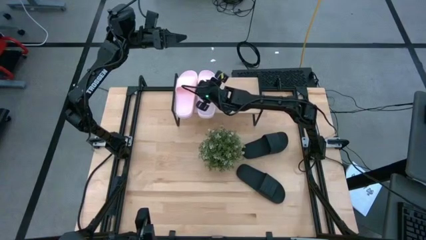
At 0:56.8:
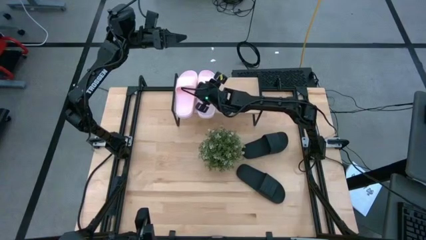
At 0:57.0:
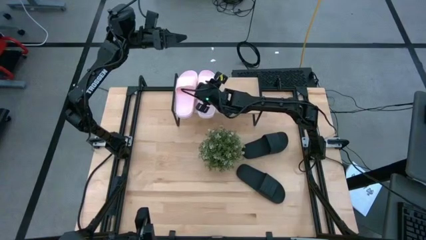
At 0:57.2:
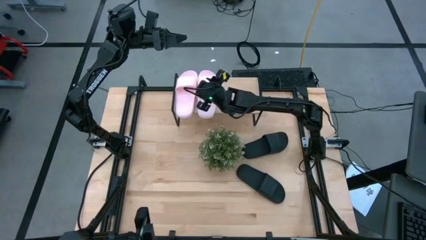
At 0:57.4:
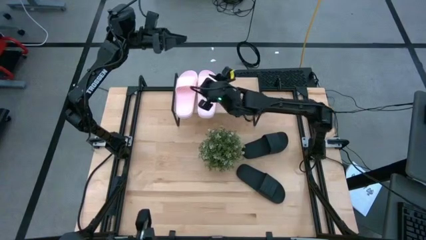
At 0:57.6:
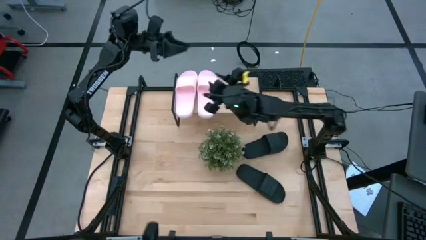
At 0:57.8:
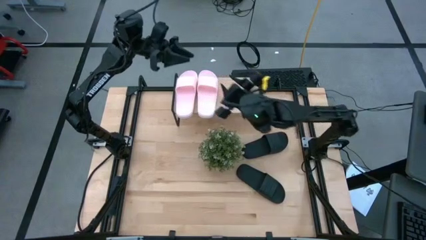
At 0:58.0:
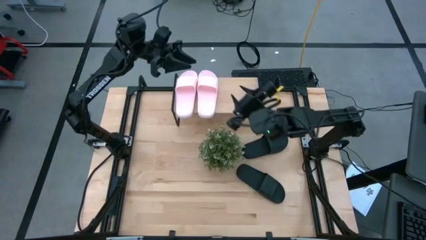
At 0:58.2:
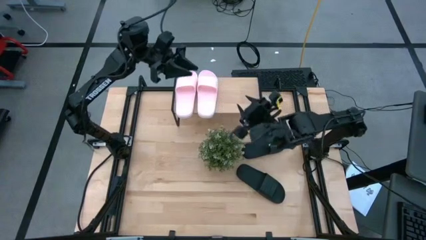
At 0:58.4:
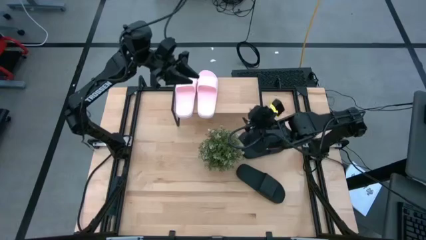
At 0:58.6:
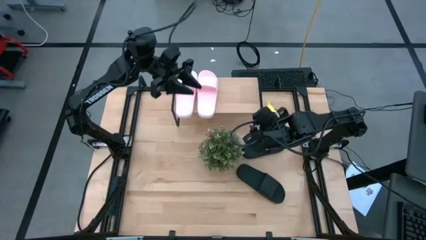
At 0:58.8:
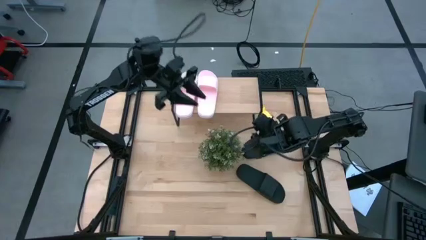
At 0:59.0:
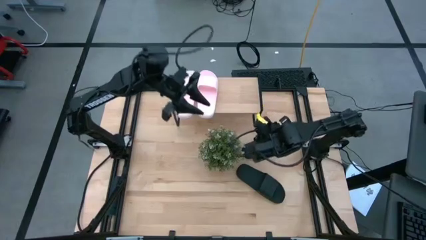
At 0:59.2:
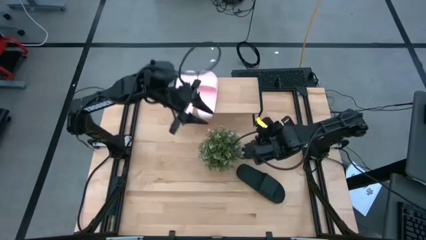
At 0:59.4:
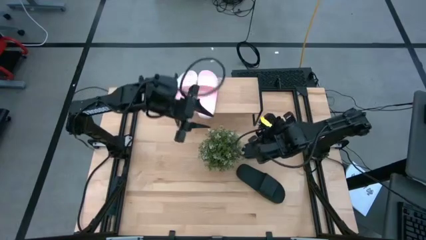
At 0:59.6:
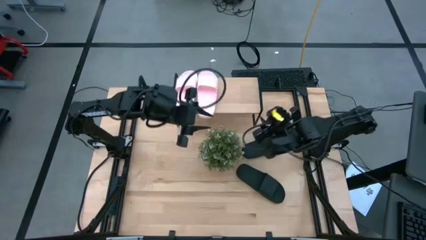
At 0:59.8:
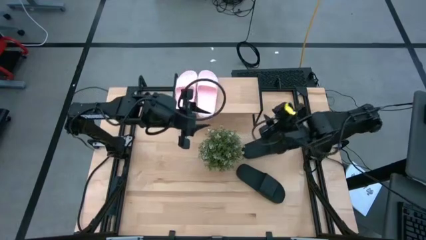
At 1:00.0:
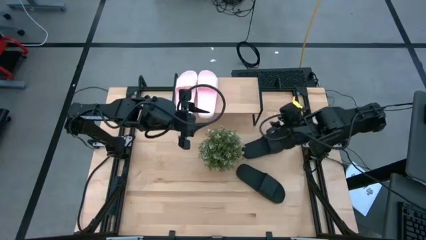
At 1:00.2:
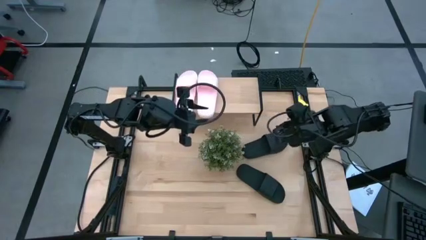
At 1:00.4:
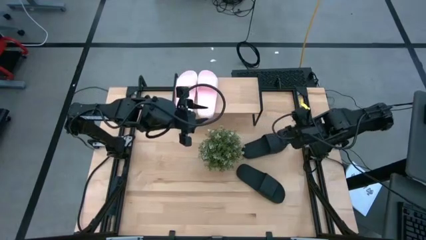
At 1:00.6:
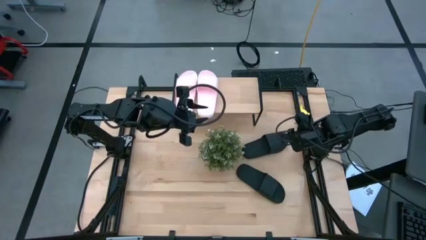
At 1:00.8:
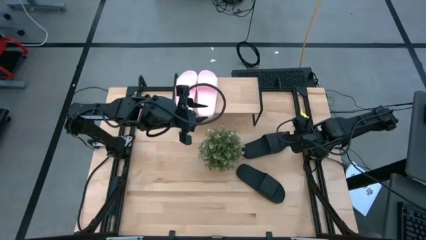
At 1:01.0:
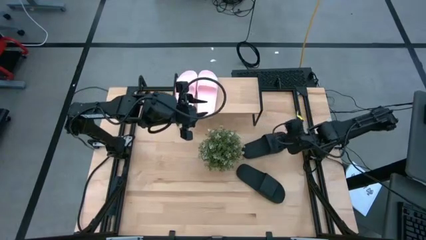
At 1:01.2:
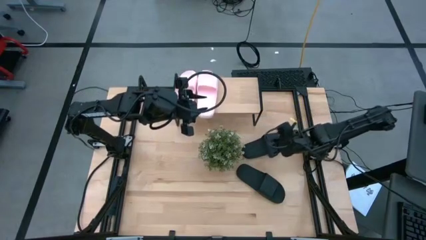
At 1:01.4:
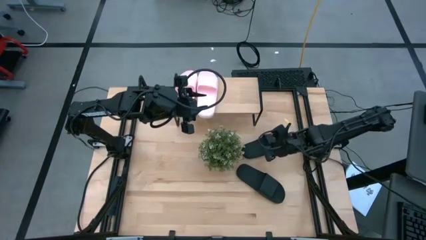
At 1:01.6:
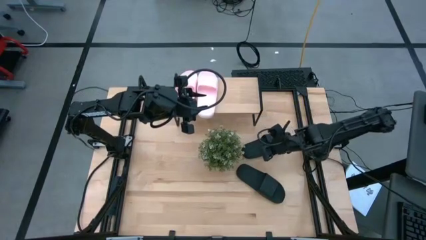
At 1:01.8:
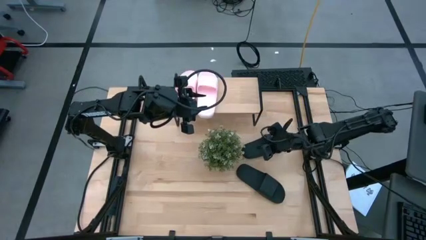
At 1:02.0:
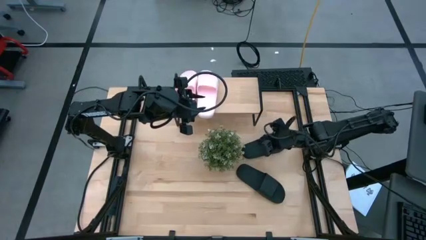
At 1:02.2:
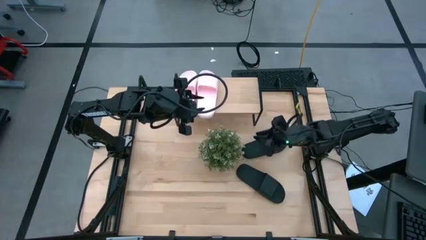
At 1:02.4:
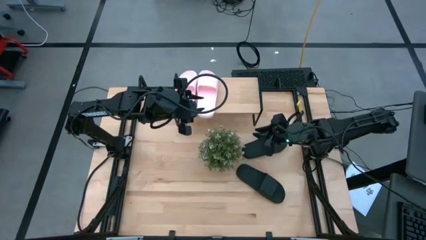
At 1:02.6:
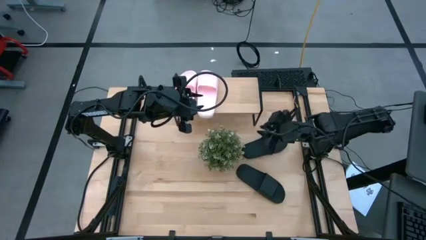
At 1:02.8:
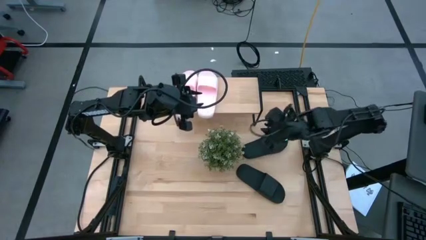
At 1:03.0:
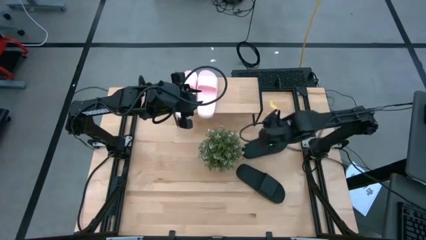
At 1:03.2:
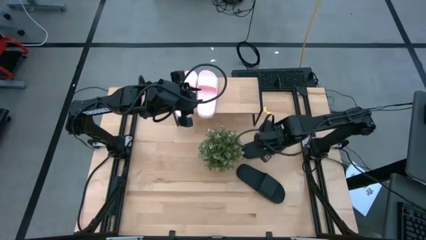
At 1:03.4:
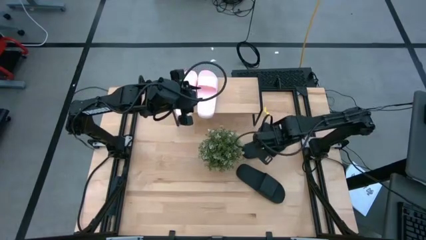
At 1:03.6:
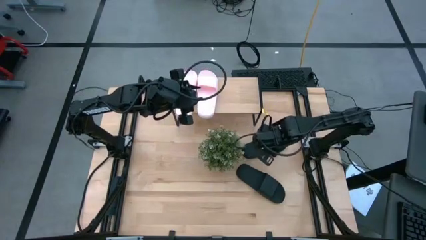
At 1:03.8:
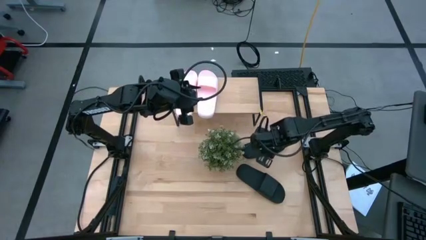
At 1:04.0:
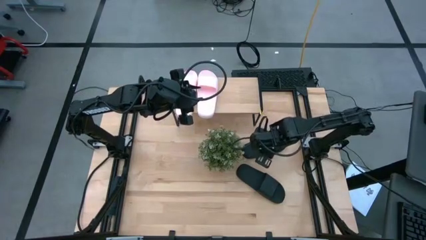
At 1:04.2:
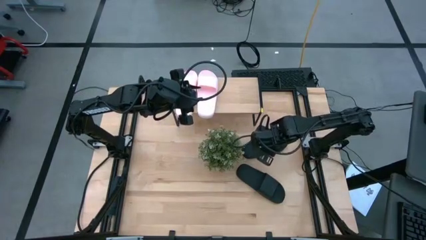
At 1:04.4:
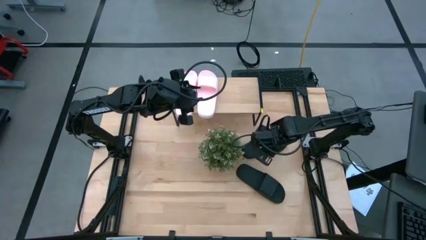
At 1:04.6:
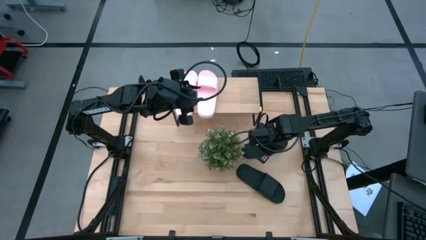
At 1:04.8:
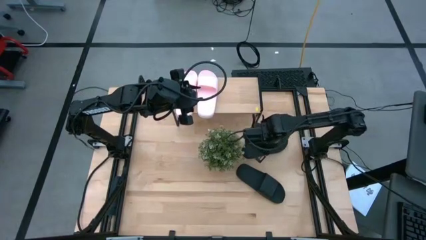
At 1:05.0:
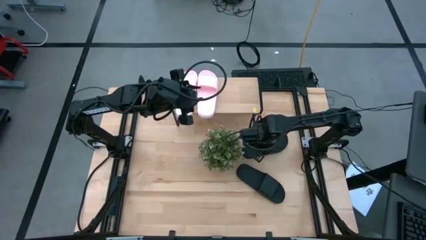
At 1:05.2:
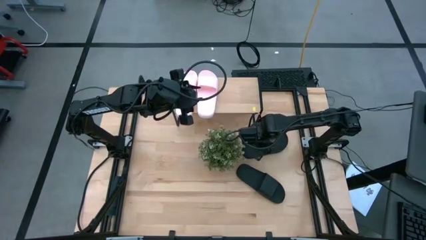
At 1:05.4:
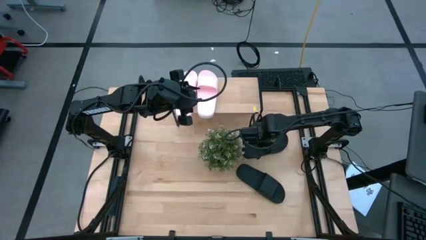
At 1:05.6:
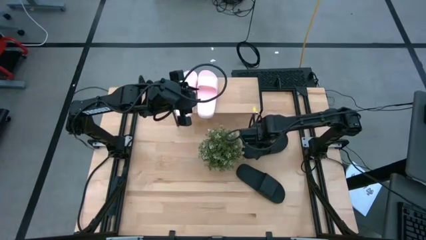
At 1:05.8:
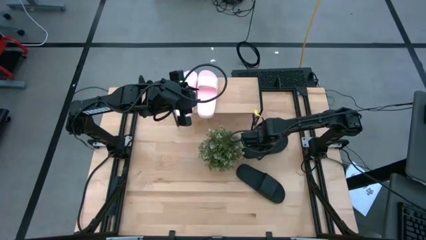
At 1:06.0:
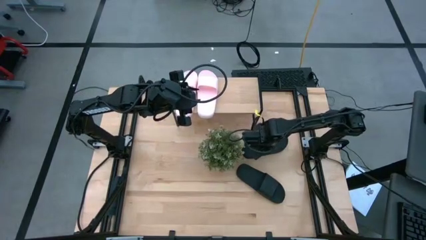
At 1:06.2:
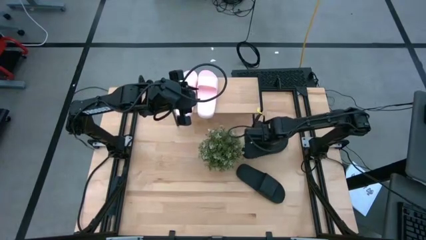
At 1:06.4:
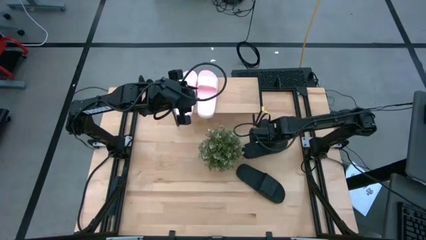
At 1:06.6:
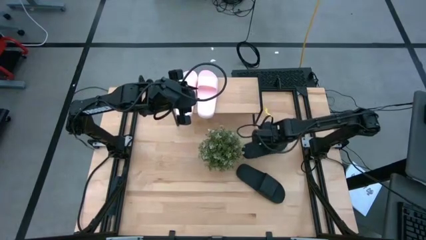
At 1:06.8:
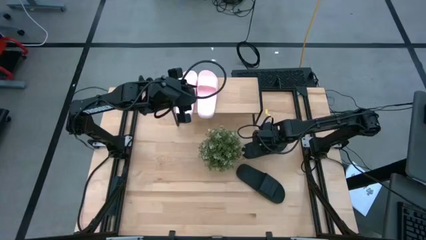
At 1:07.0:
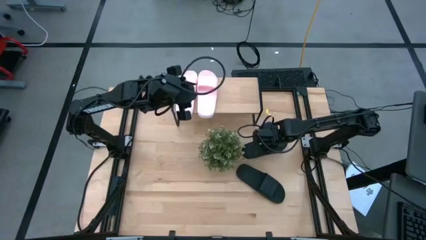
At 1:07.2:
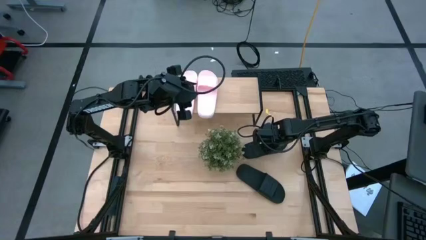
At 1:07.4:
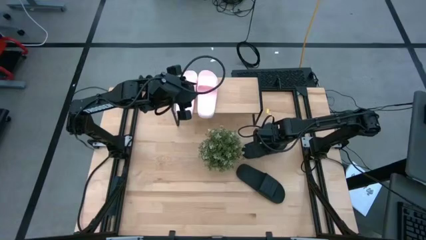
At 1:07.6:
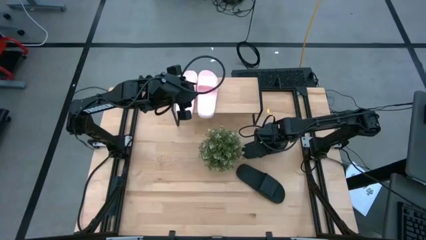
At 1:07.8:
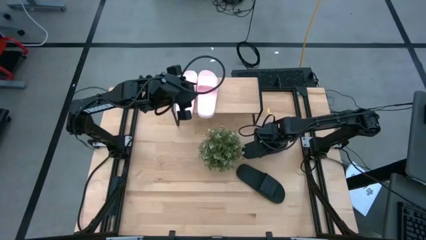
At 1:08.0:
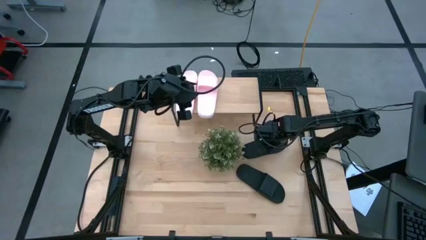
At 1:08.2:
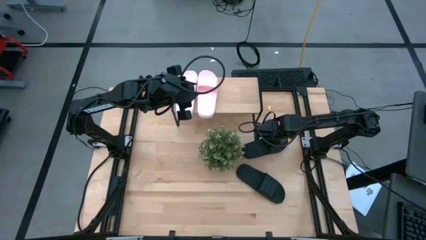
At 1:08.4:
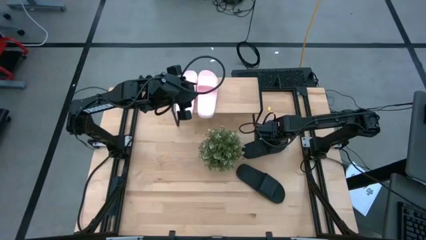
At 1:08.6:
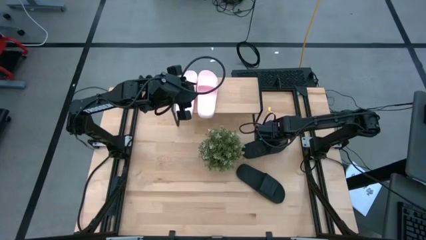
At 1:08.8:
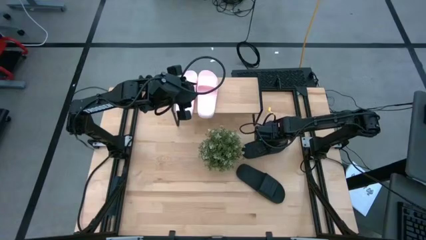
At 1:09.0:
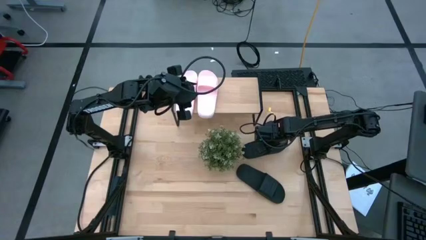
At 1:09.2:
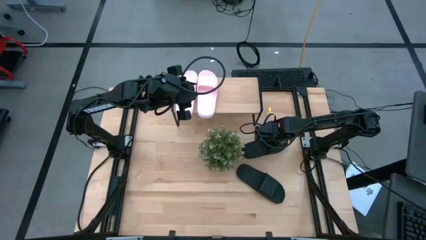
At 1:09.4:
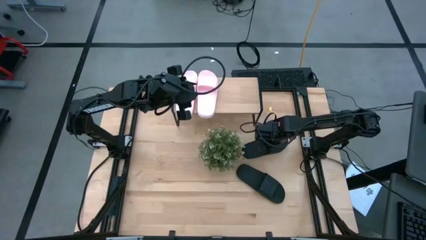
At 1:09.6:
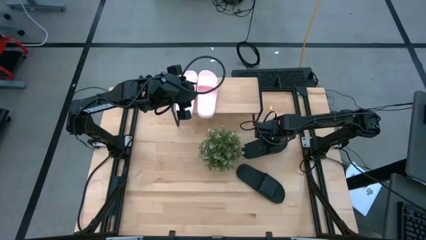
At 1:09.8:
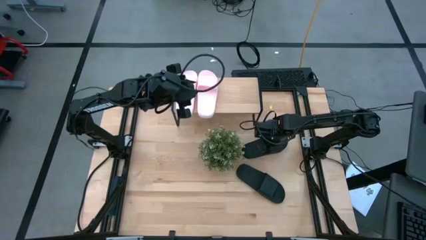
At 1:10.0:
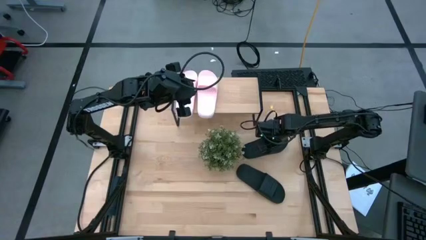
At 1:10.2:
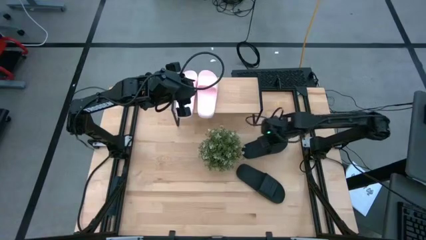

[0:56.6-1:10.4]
Task: Pick and place slides into the shelf
Put the top black slipper on the shelf
